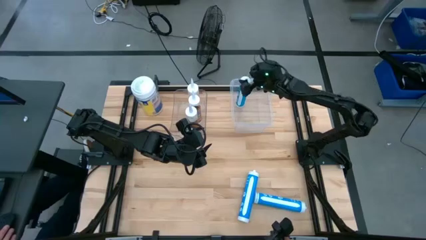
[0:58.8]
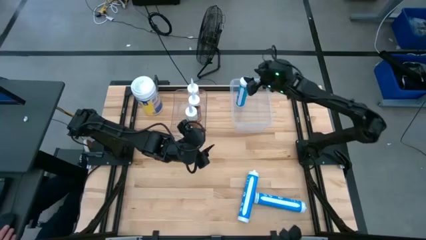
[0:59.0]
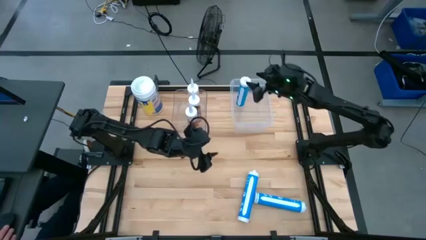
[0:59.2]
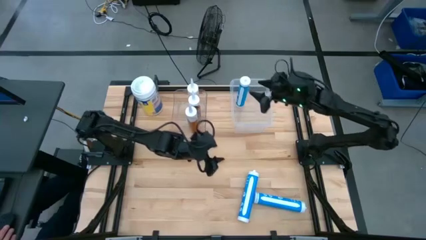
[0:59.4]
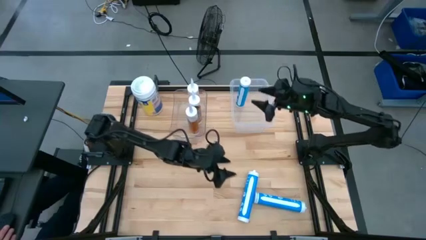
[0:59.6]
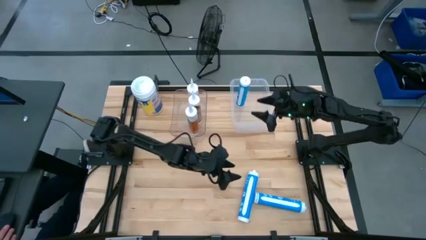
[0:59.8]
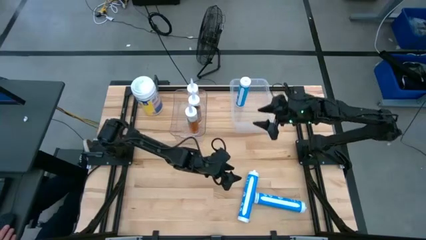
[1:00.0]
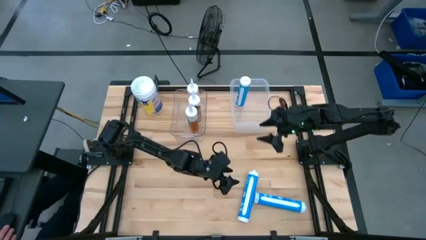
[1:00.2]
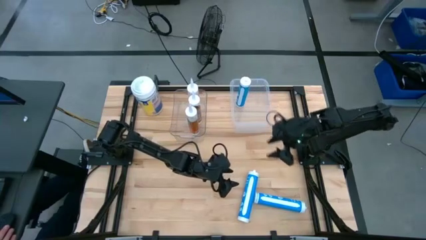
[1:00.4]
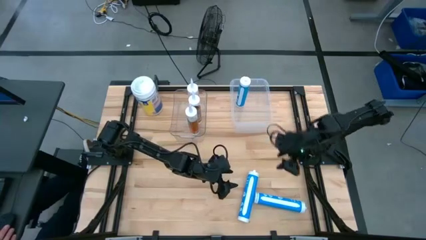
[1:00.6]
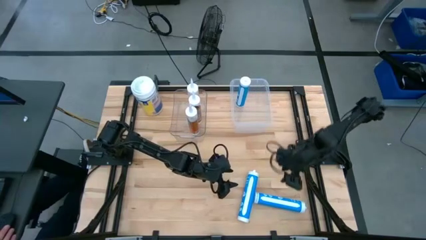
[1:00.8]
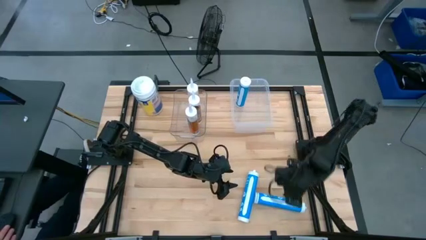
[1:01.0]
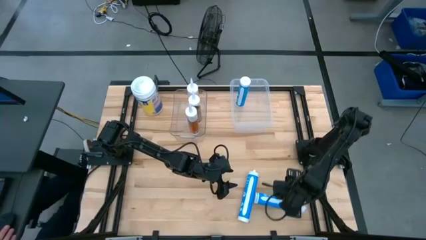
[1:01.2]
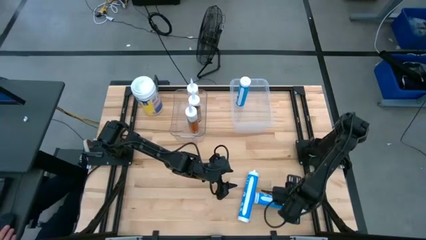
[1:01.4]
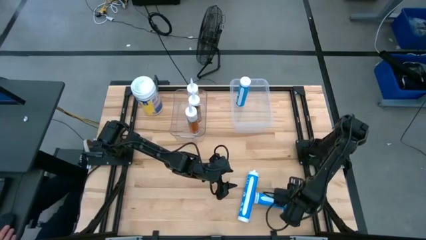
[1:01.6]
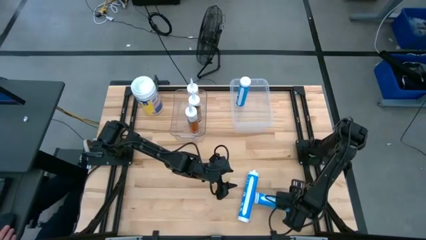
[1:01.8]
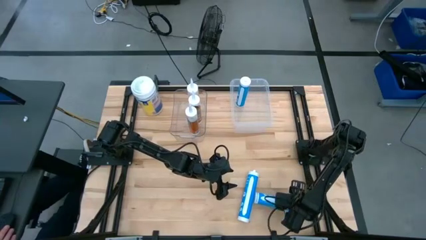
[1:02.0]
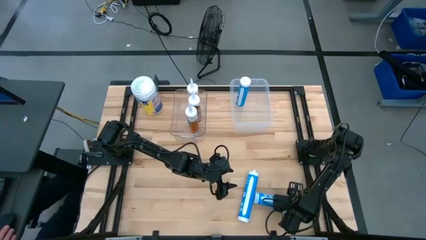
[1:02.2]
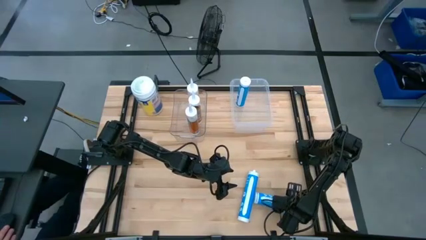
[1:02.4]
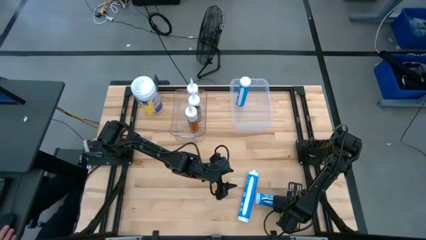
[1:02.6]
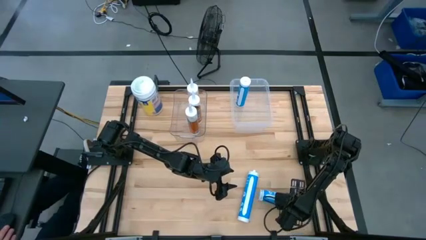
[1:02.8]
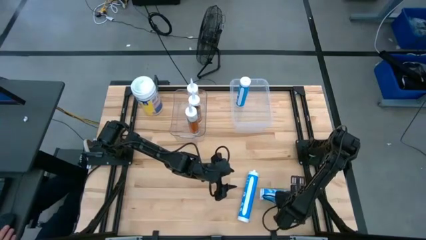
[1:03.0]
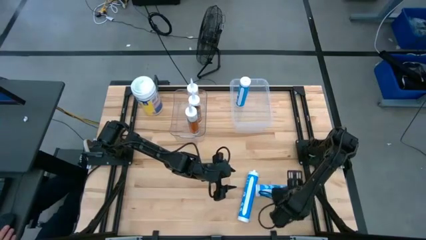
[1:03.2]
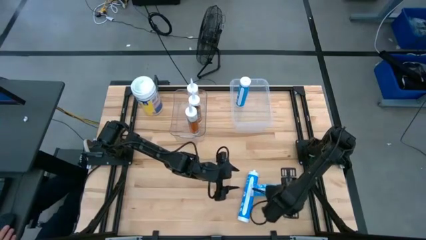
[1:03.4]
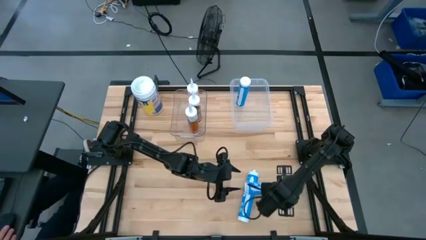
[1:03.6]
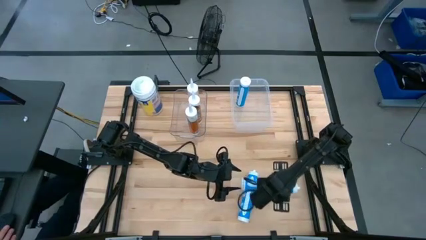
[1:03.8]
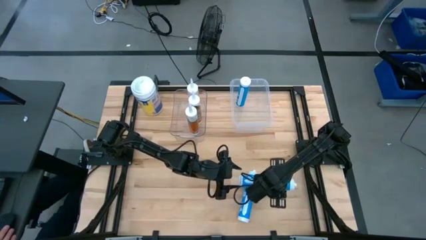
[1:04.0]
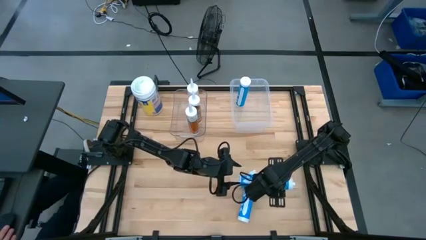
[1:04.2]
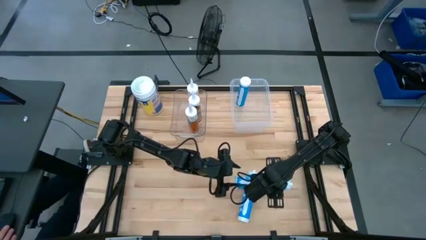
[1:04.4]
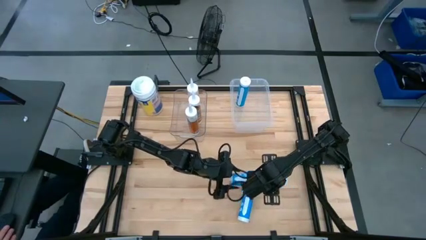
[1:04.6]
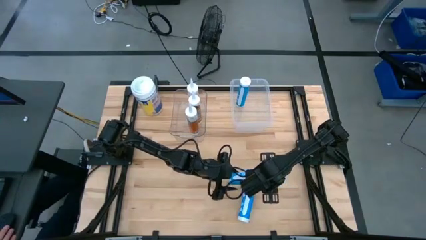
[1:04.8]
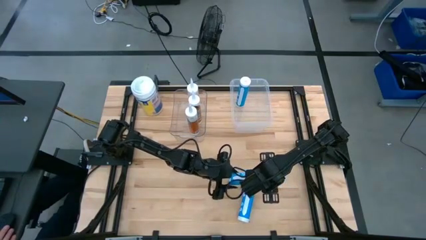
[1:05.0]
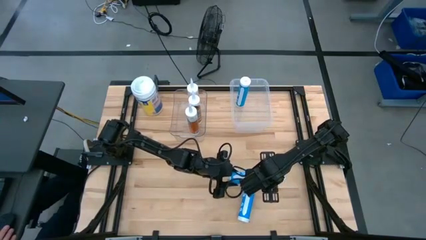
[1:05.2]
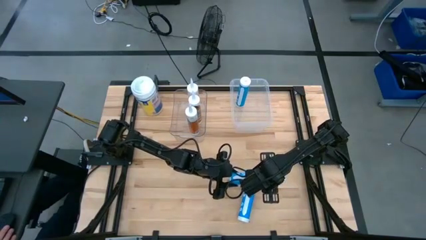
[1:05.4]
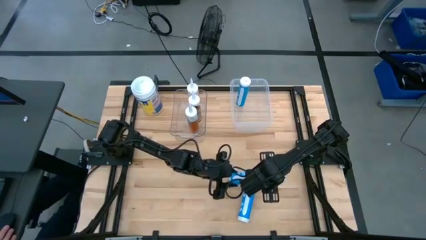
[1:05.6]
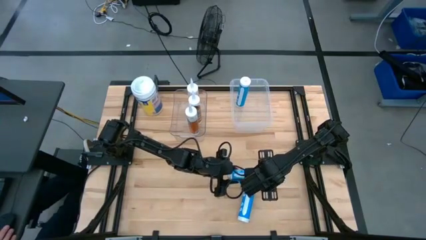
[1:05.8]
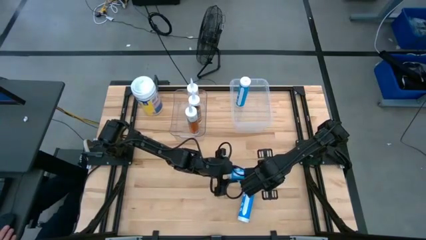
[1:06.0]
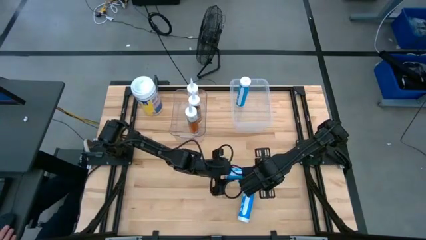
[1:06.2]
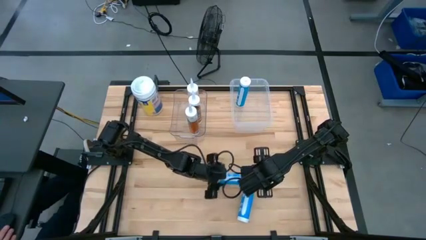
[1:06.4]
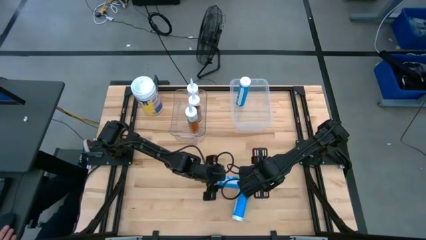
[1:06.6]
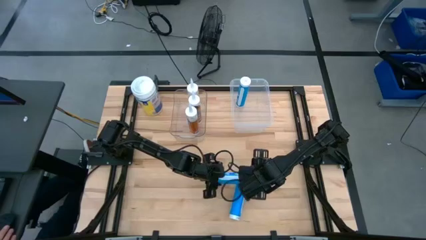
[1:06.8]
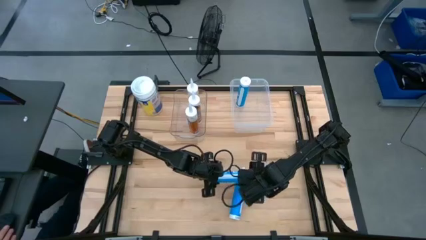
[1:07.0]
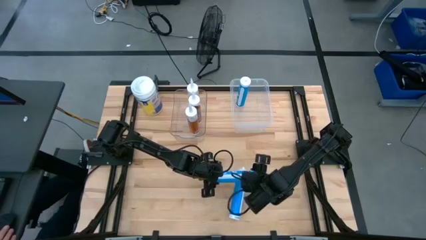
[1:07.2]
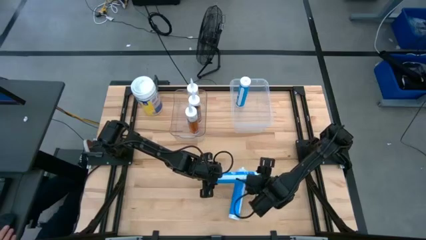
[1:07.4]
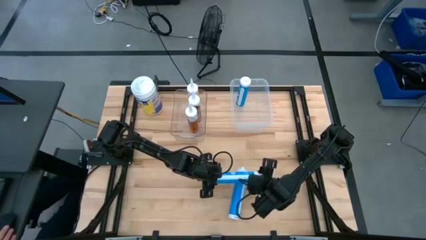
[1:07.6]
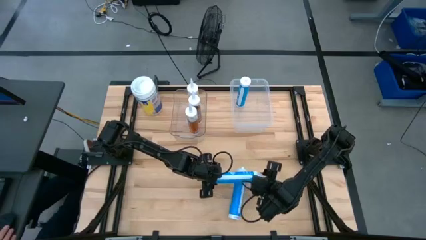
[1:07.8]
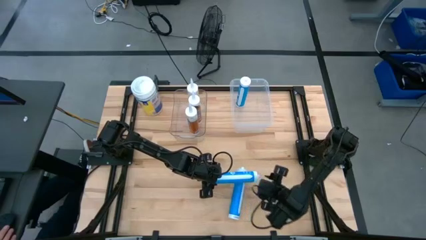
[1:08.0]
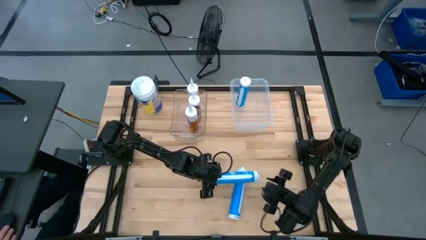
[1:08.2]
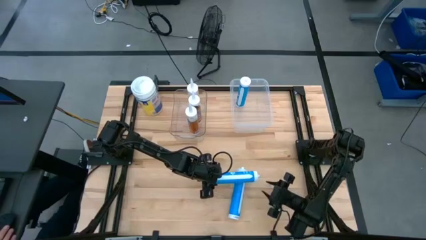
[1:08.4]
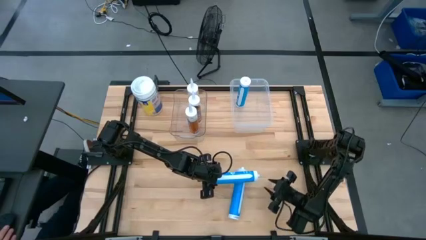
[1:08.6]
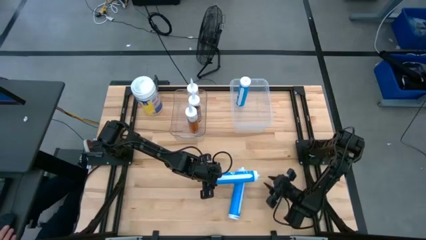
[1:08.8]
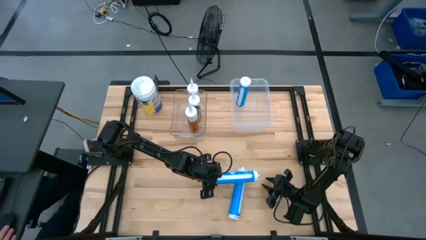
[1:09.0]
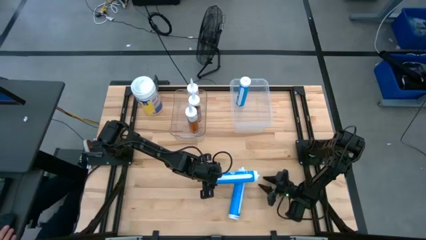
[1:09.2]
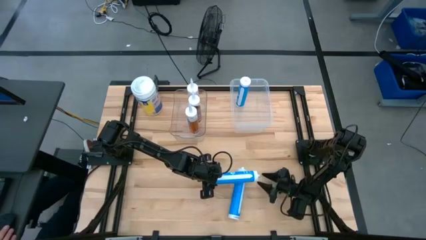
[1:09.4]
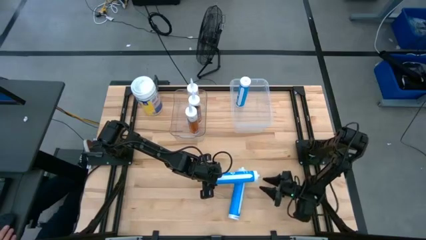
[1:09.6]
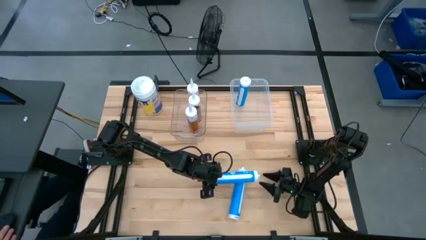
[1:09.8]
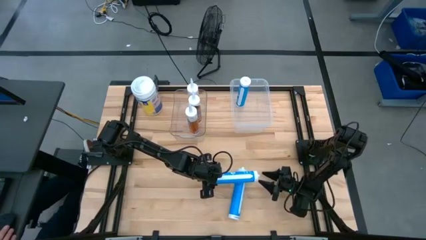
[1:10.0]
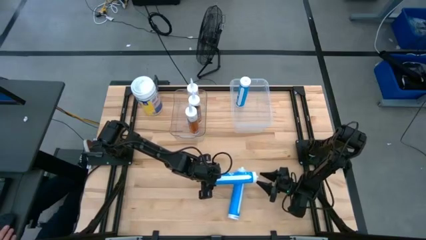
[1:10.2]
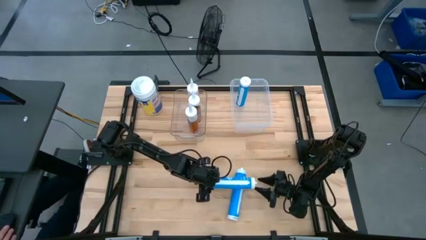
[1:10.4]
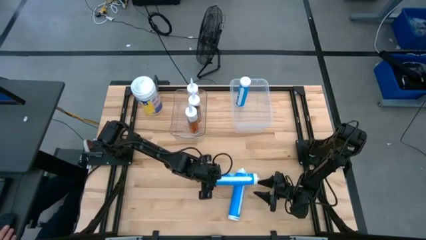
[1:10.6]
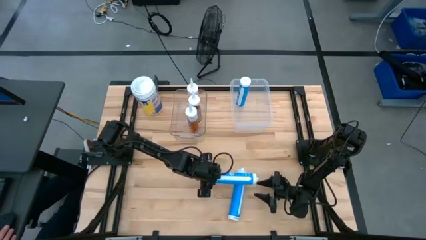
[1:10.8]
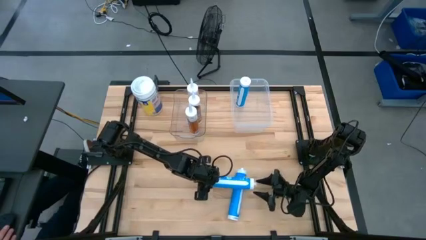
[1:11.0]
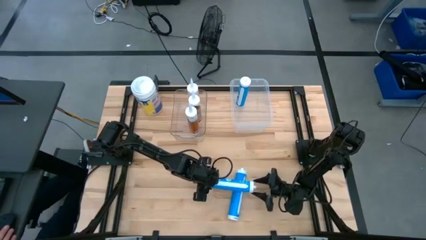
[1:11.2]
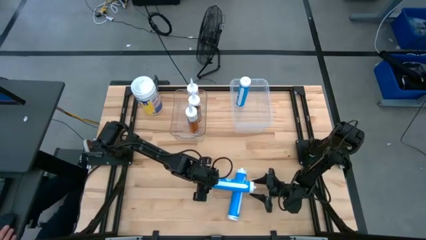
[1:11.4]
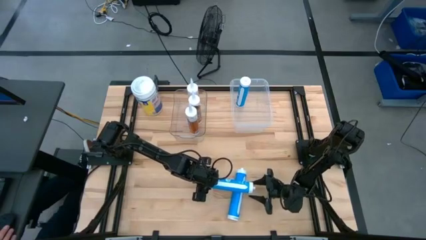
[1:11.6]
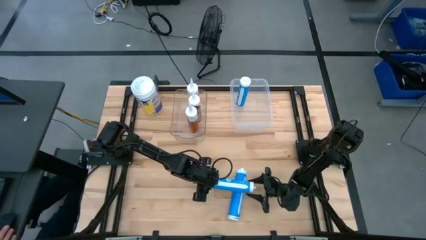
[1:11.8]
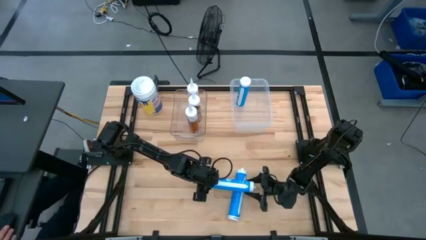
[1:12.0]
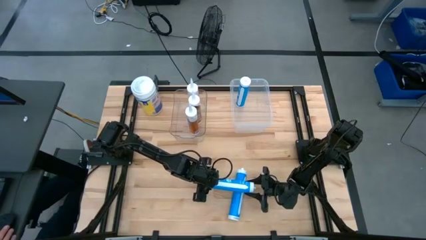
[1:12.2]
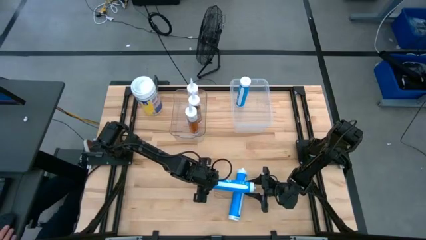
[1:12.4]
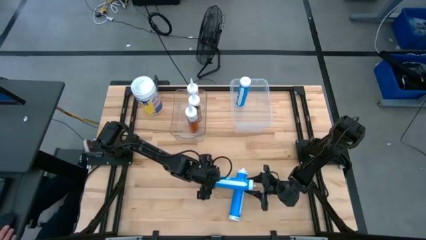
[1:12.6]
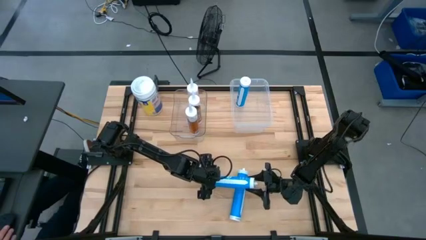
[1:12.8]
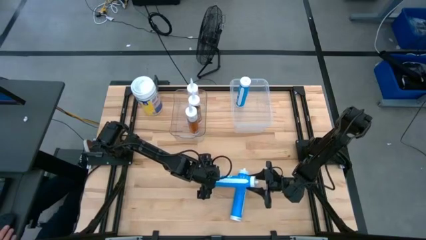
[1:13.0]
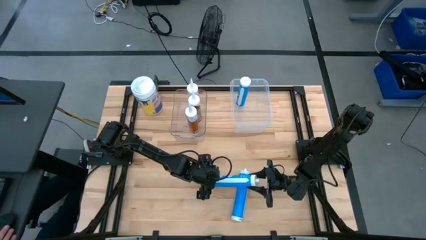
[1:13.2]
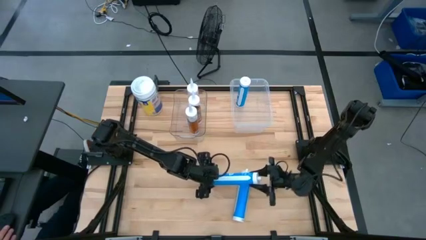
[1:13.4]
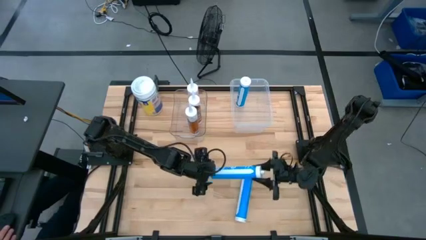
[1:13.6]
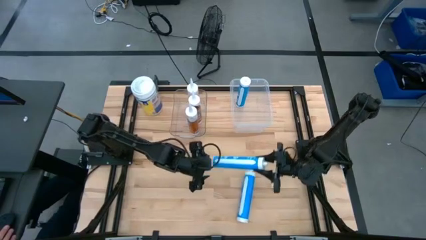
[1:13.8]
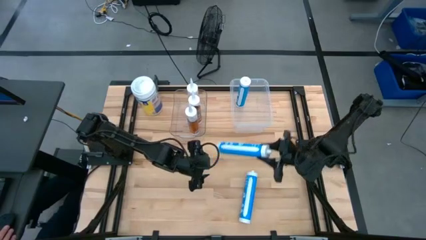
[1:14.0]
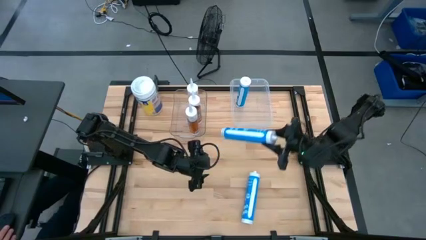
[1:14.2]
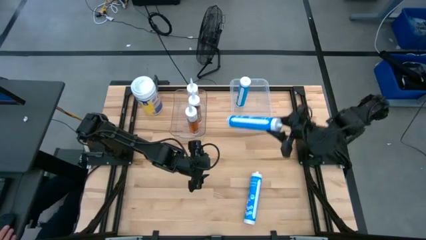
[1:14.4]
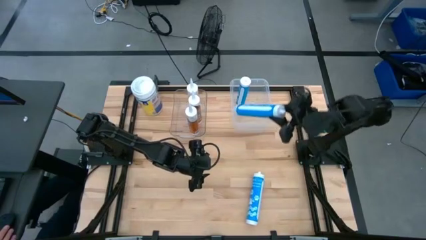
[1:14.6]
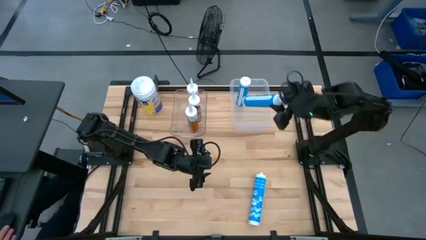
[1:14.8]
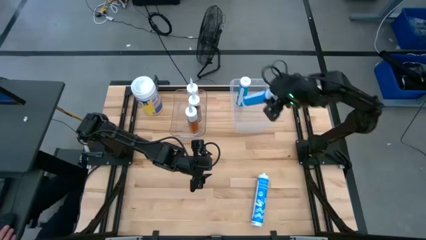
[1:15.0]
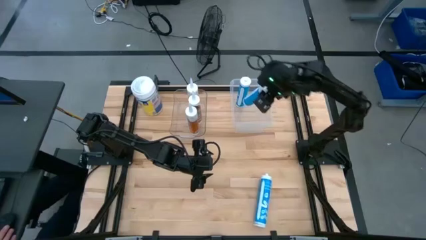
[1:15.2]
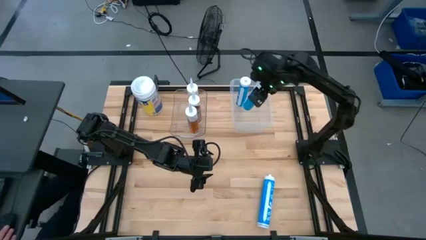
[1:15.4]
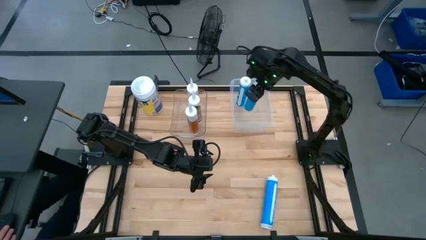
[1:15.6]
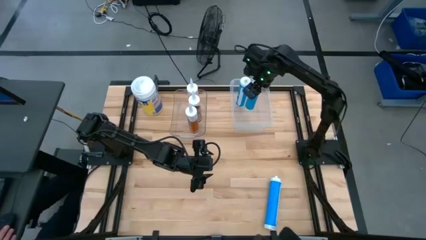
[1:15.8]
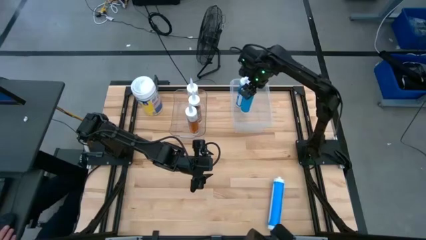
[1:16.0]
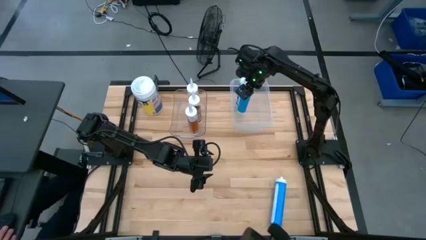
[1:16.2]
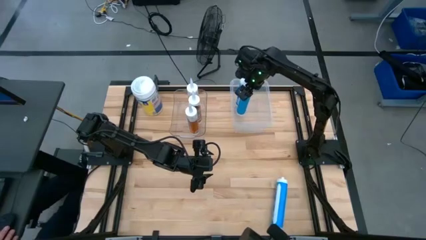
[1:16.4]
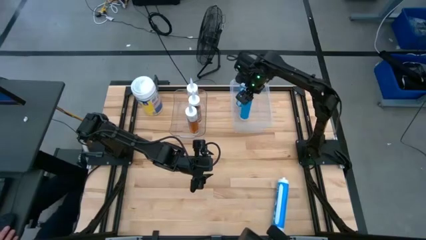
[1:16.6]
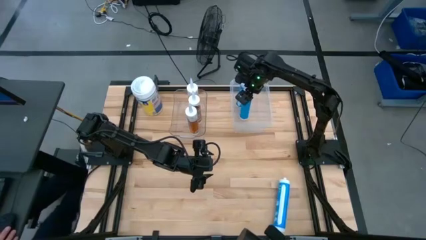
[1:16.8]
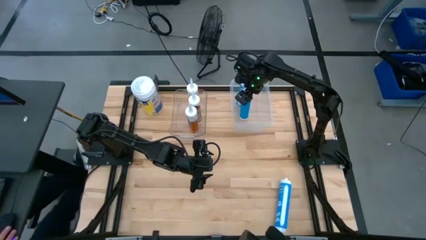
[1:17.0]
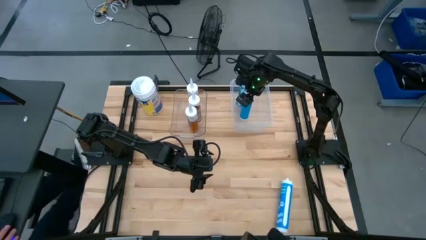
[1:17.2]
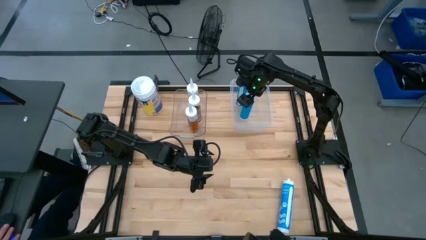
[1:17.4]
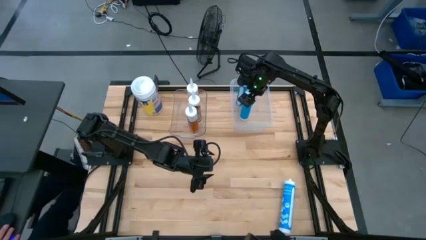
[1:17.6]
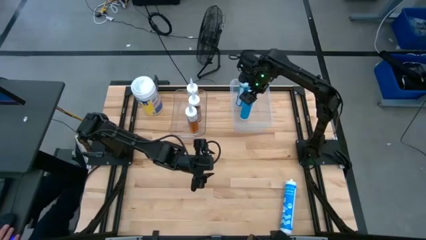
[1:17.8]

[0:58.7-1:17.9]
Task: Pick & place silicon tubes, Sealant and Lysol wipes
Put the right blue sealant into the right transparent bin
